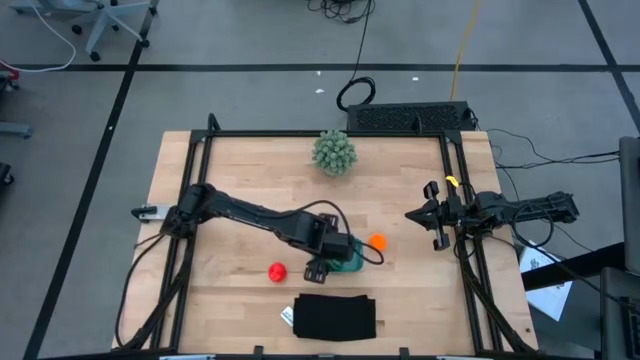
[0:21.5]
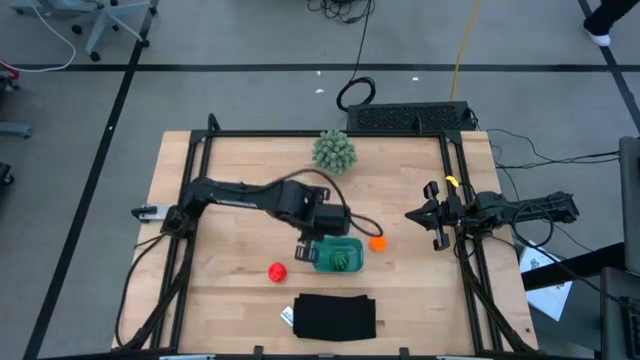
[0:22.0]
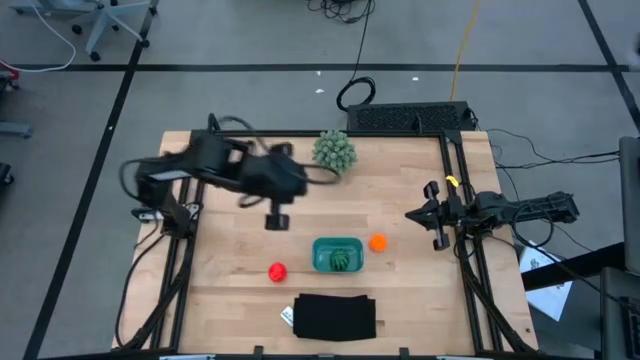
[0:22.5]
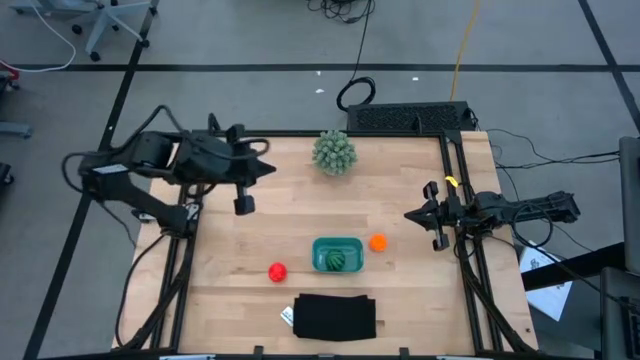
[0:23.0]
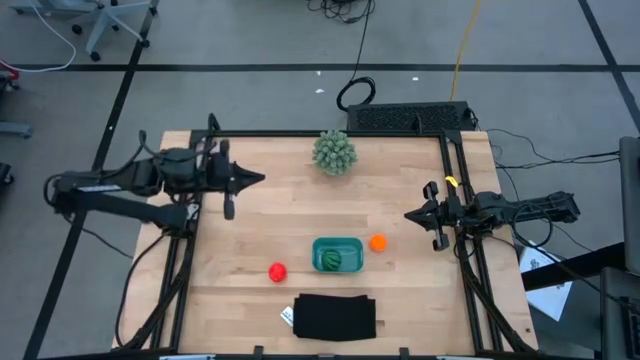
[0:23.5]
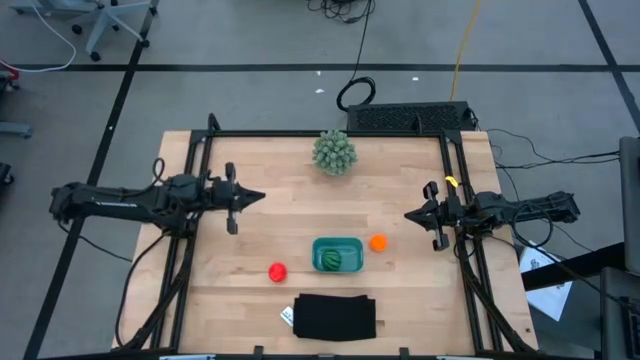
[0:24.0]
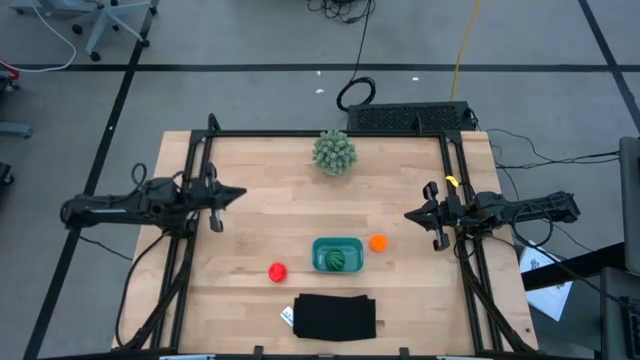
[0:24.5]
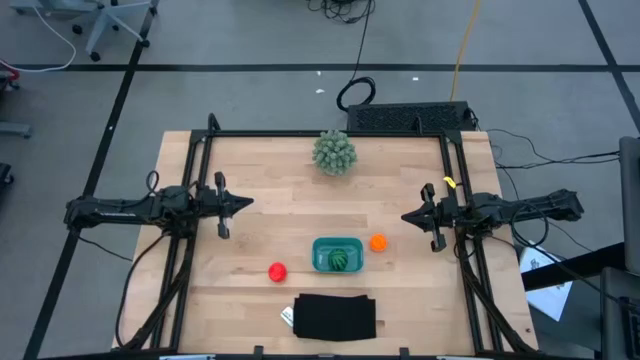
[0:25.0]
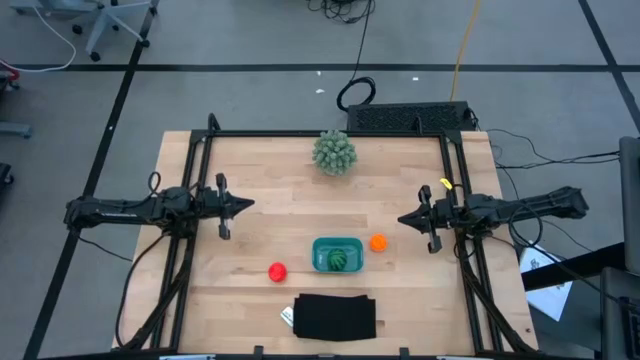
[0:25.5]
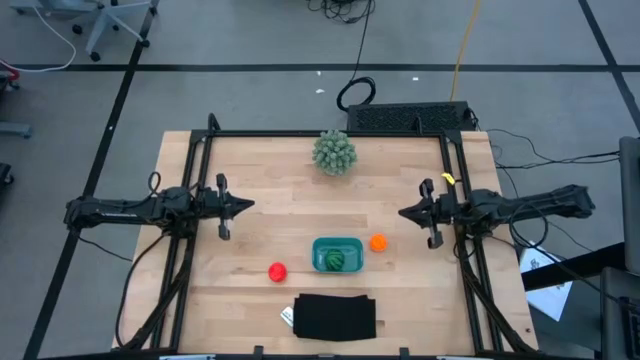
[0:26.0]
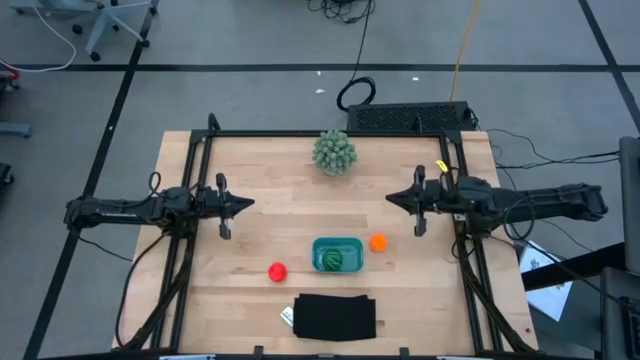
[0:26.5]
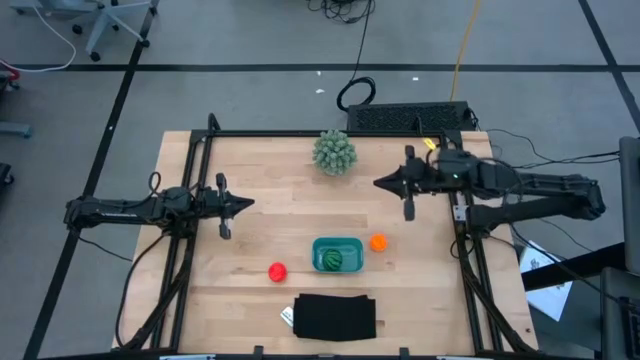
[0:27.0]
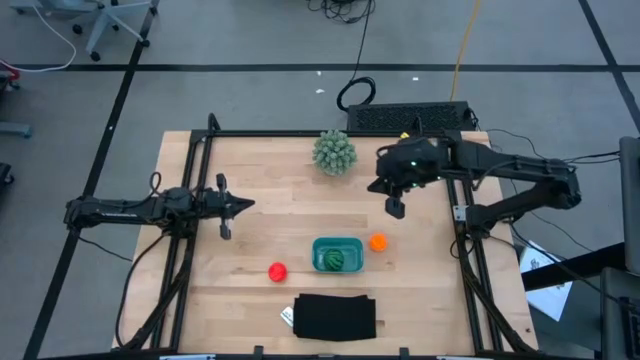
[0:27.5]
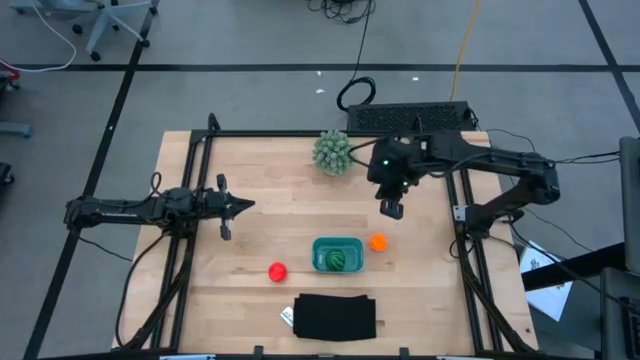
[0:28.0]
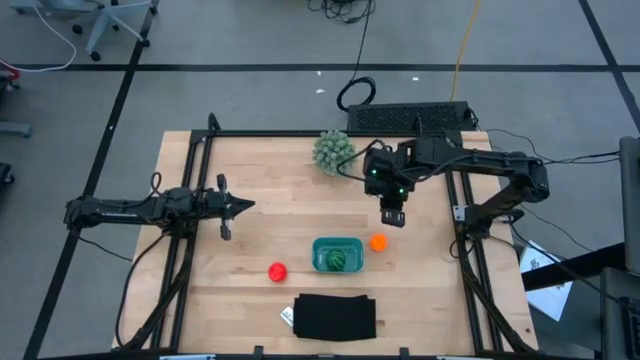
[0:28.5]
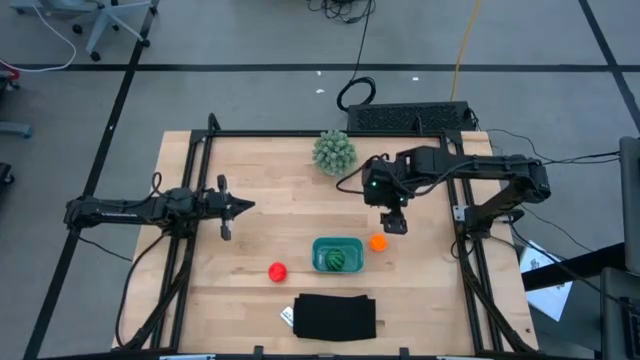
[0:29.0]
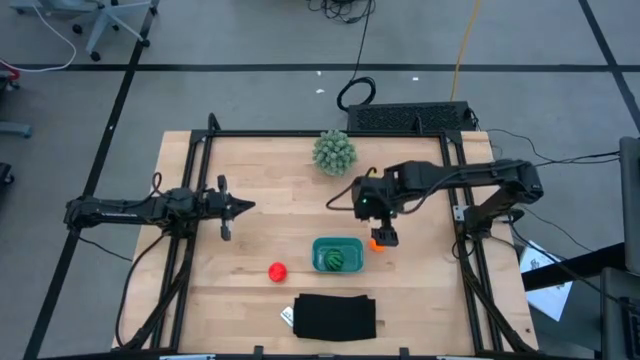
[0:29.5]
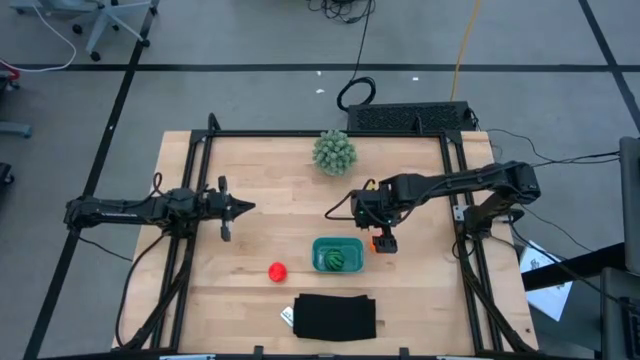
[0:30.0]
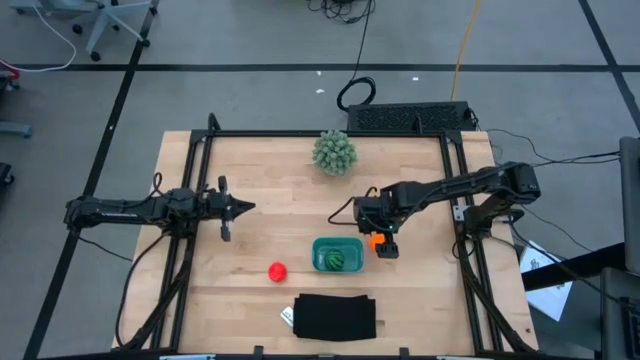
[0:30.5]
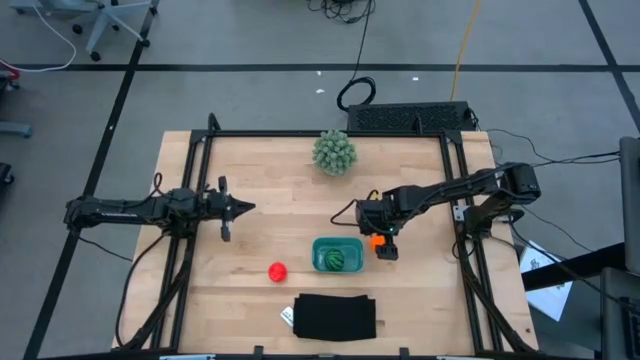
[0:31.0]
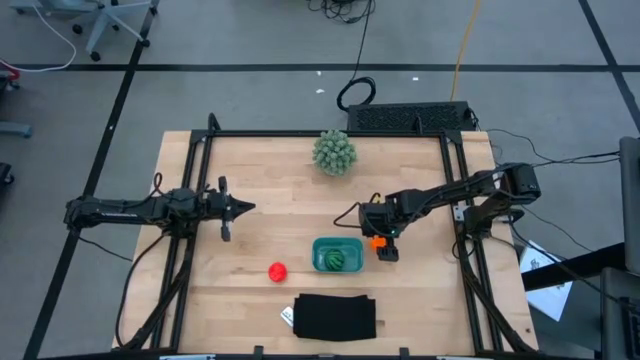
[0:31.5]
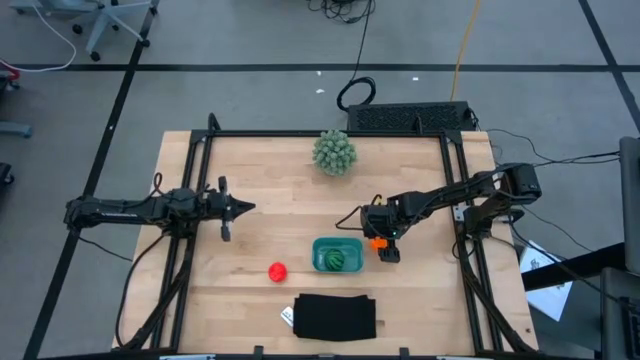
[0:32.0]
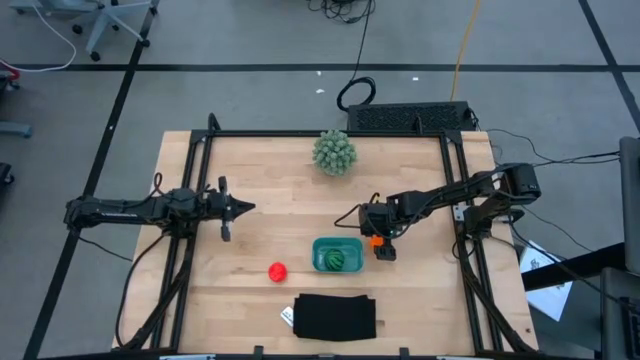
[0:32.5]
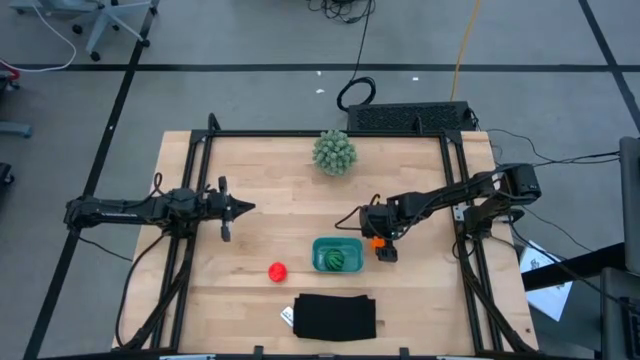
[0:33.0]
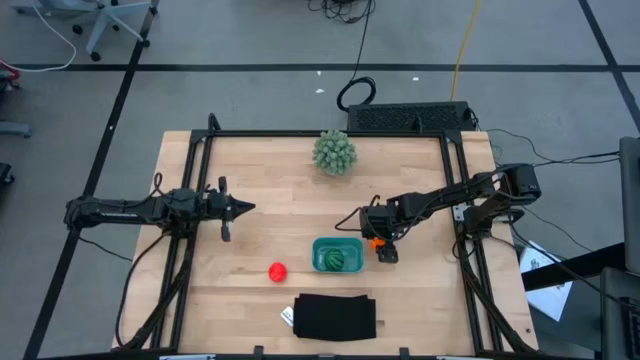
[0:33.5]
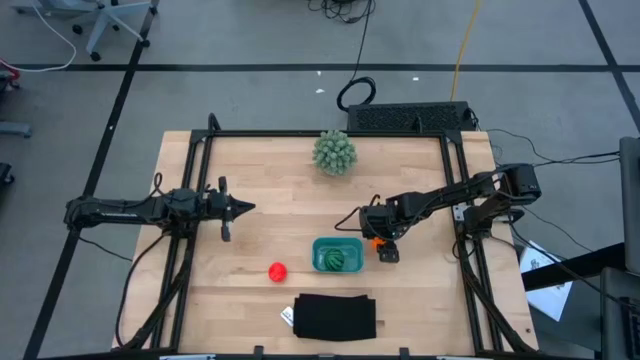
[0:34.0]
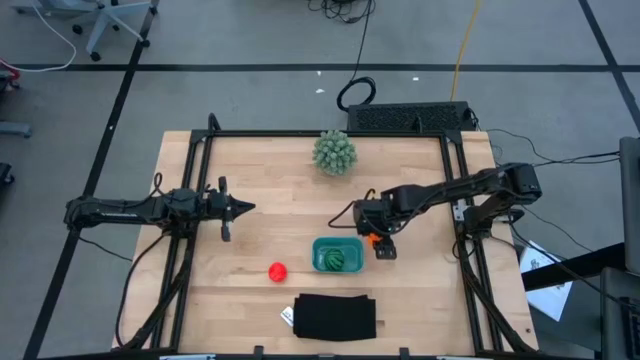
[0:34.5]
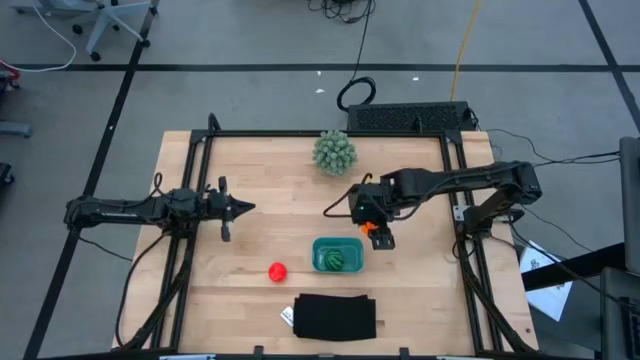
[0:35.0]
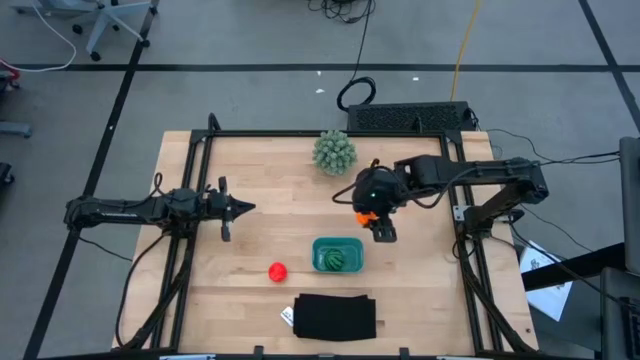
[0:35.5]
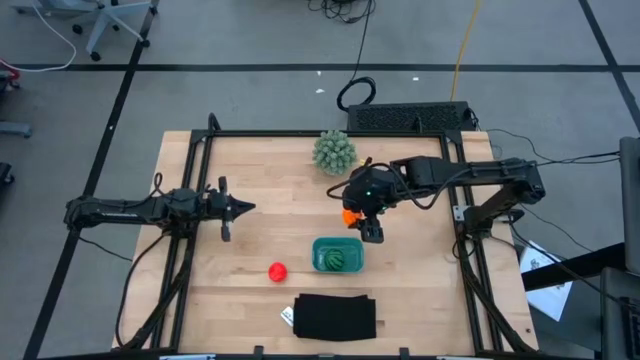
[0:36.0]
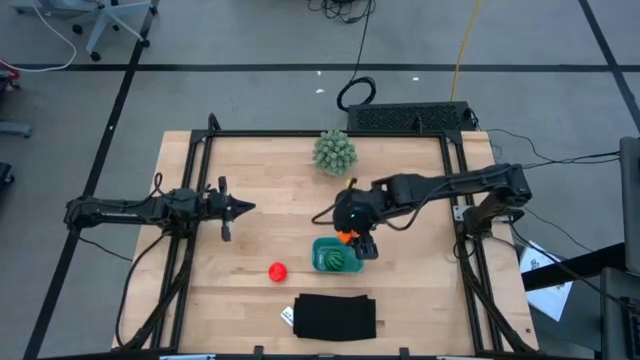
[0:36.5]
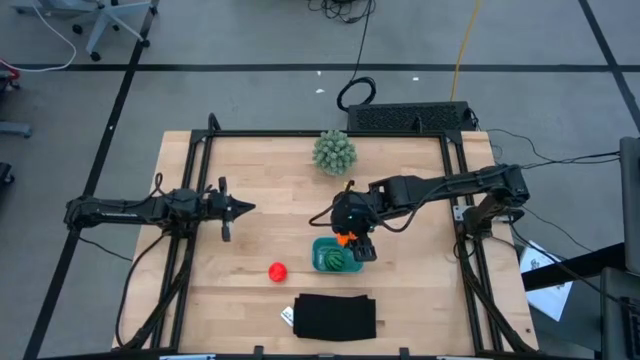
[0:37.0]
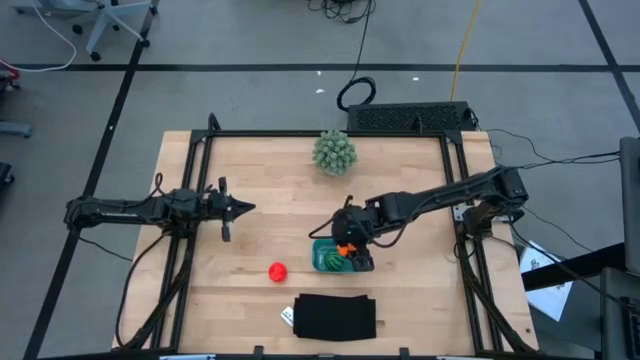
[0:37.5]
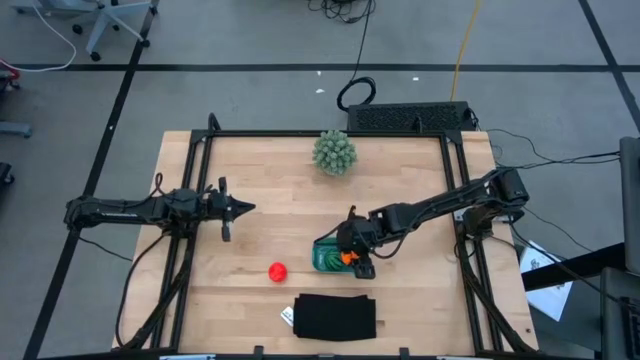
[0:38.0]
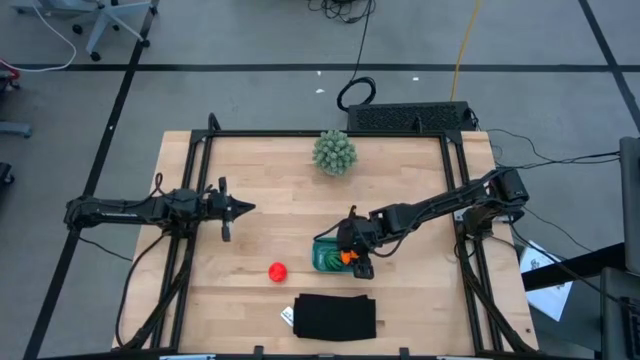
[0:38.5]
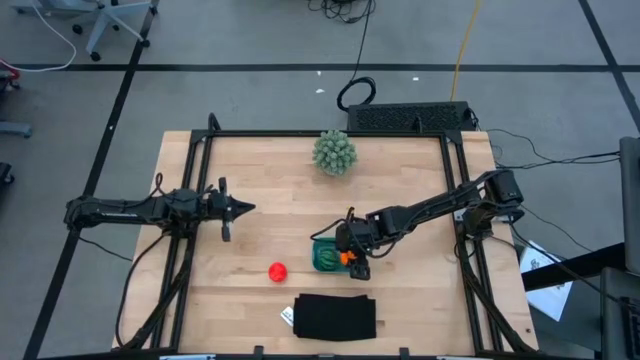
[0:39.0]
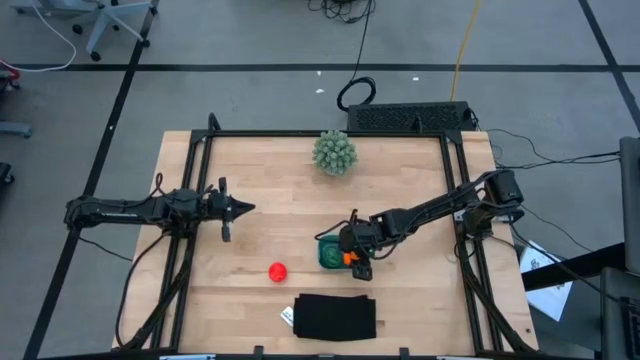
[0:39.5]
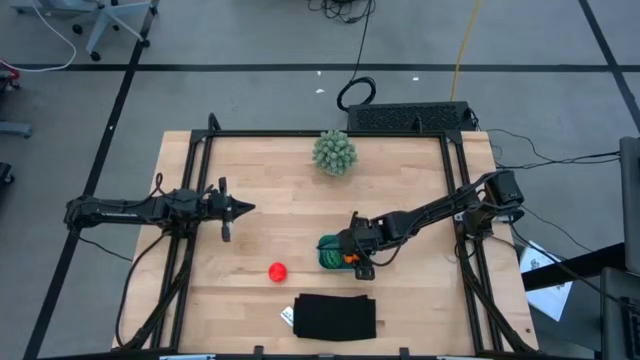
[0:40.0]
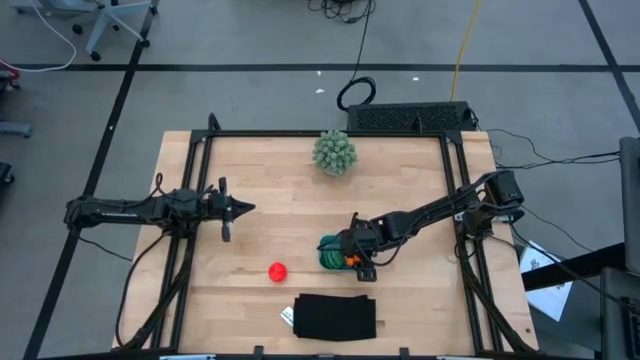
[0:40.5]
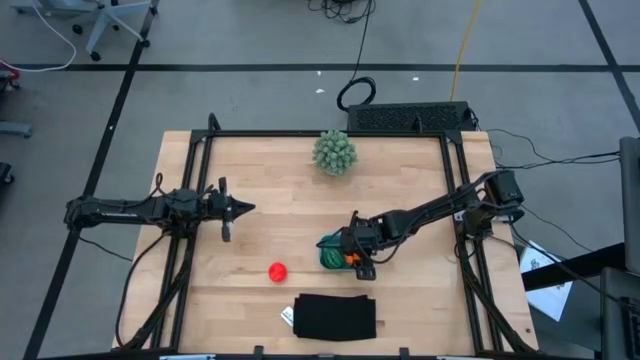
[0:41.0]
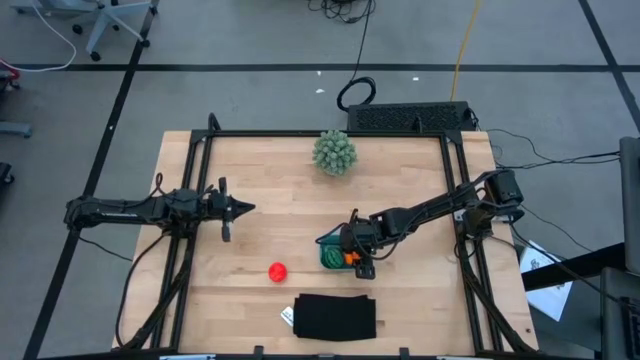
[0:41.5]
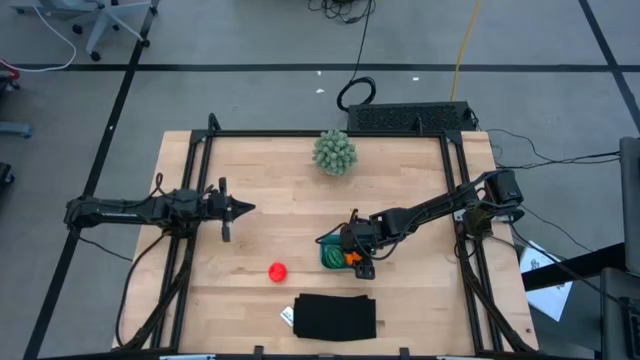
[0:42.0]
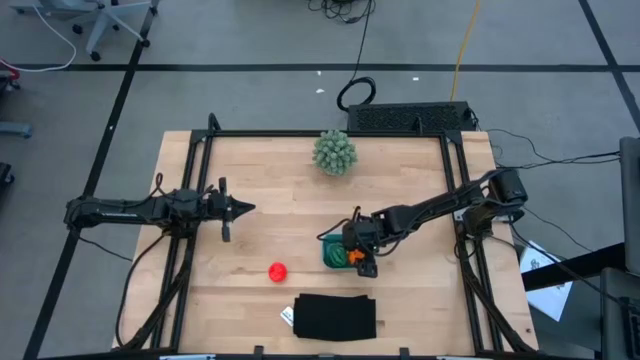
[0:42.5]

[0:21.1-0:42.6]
Task: Pick and placing Produce into tupperware
Put the pumpkin into the blue bin
